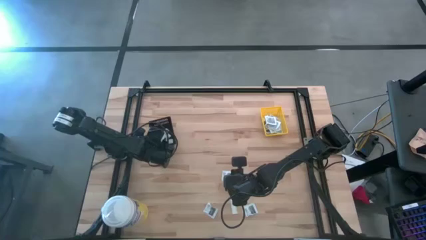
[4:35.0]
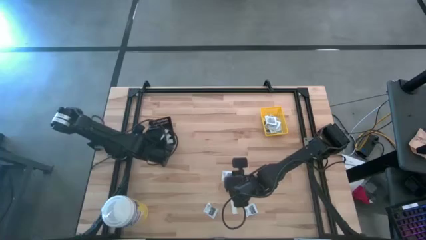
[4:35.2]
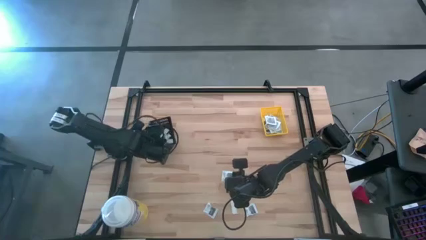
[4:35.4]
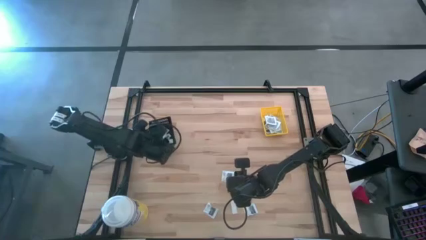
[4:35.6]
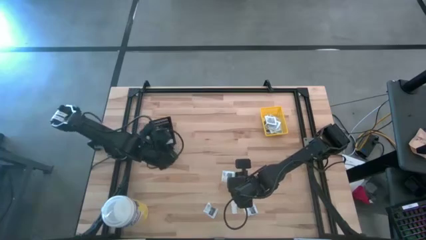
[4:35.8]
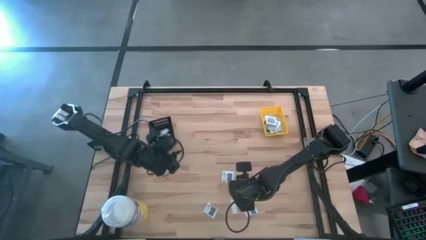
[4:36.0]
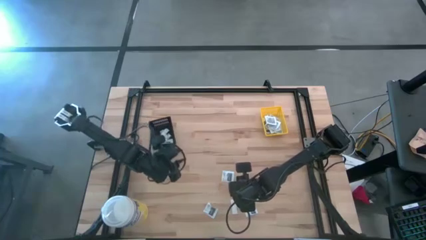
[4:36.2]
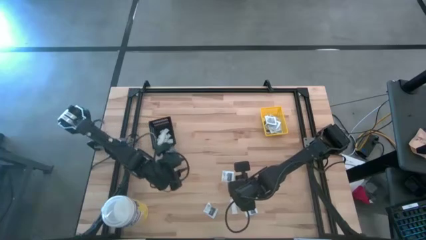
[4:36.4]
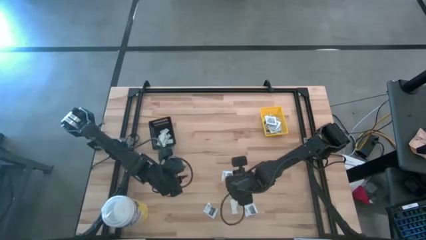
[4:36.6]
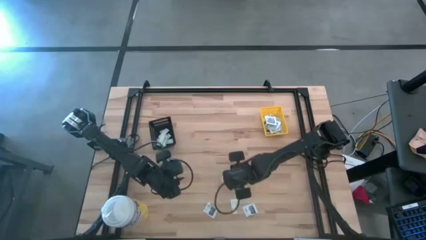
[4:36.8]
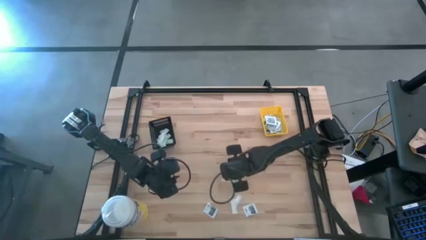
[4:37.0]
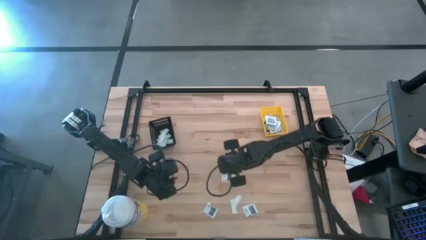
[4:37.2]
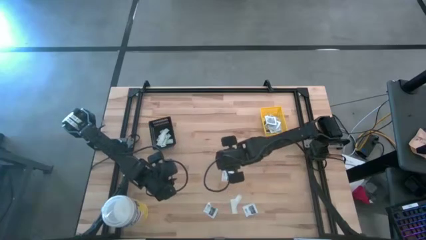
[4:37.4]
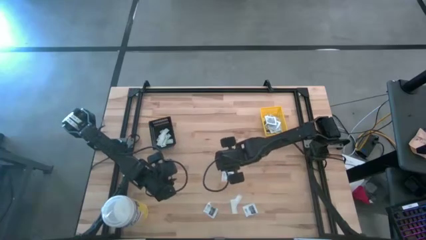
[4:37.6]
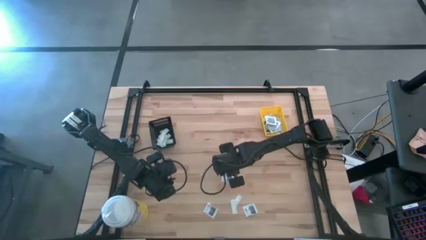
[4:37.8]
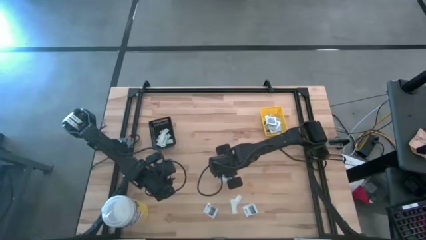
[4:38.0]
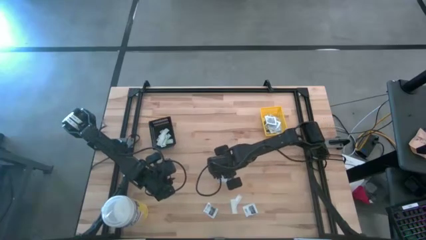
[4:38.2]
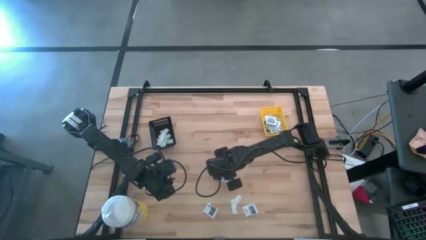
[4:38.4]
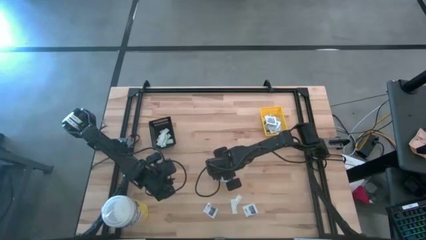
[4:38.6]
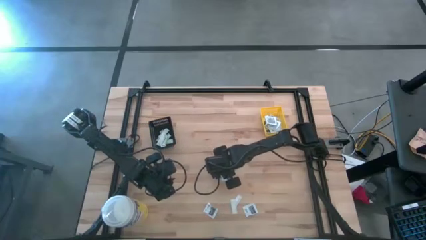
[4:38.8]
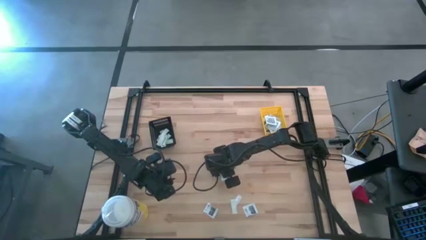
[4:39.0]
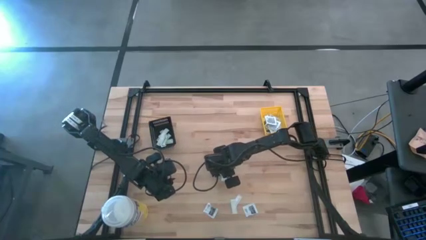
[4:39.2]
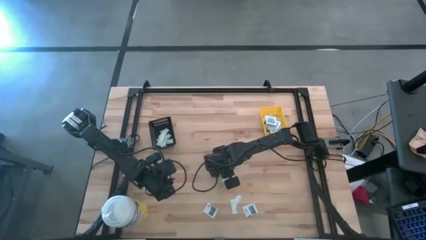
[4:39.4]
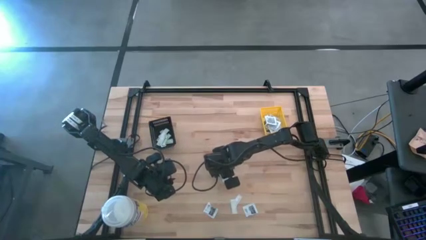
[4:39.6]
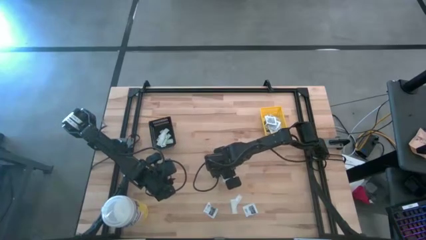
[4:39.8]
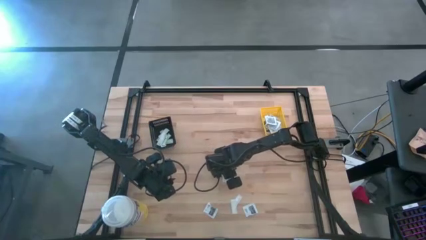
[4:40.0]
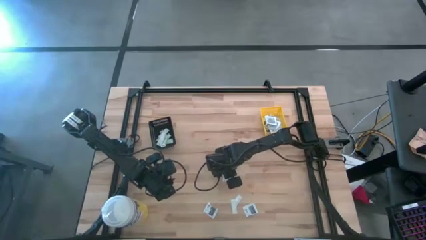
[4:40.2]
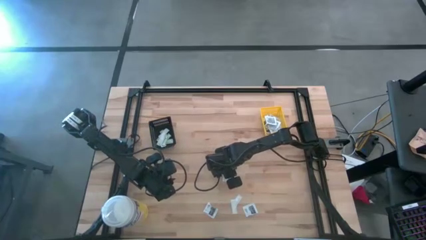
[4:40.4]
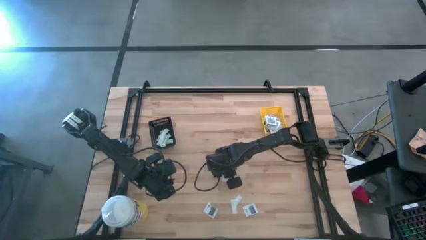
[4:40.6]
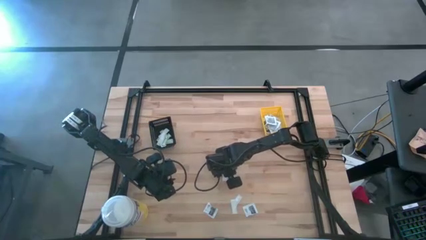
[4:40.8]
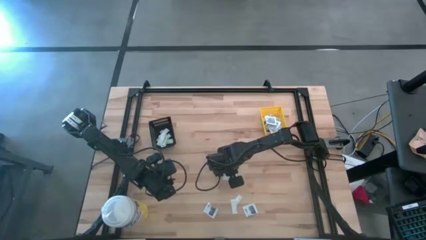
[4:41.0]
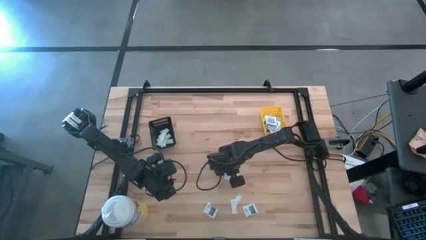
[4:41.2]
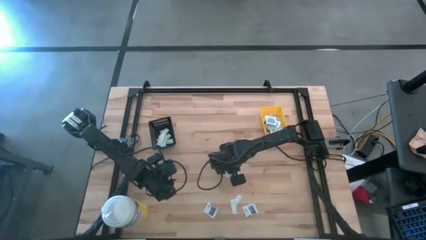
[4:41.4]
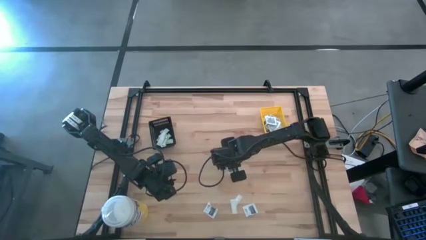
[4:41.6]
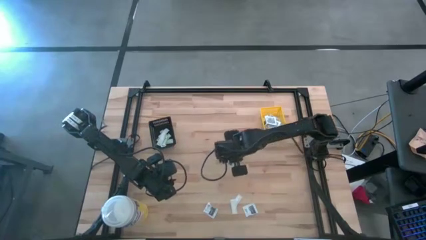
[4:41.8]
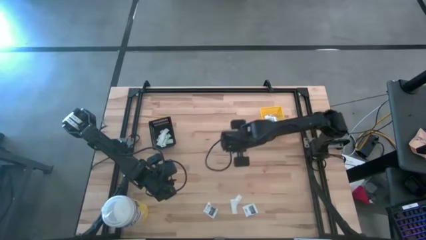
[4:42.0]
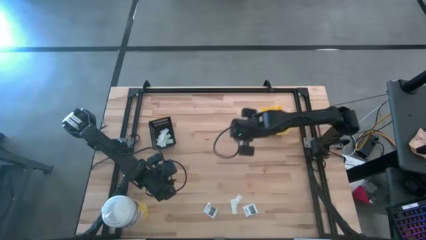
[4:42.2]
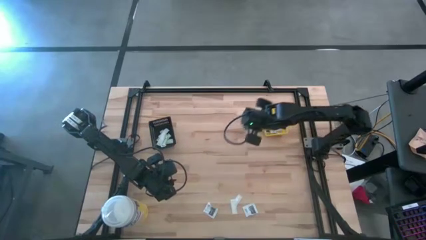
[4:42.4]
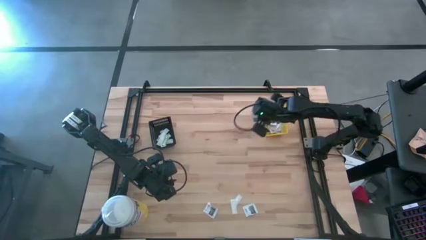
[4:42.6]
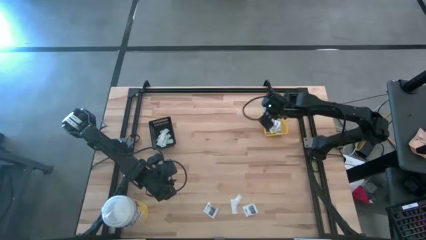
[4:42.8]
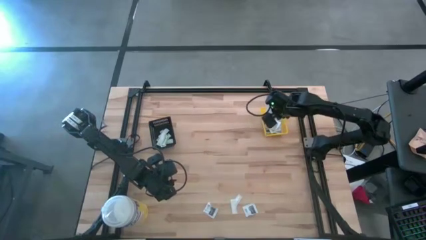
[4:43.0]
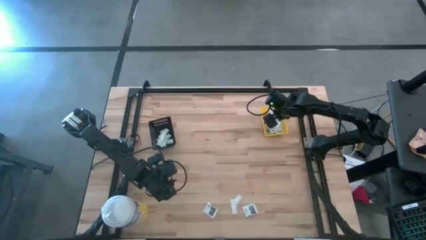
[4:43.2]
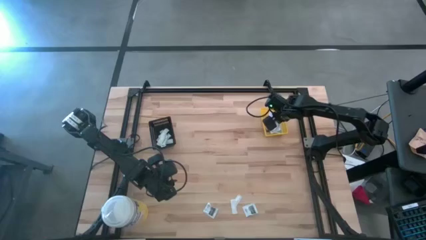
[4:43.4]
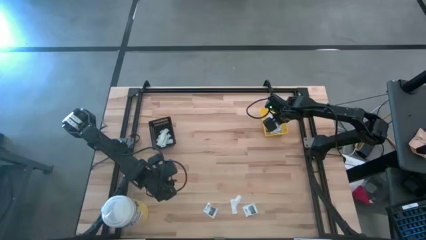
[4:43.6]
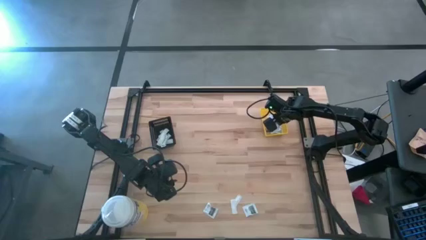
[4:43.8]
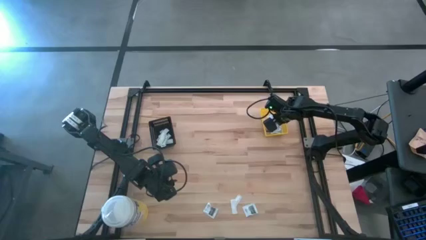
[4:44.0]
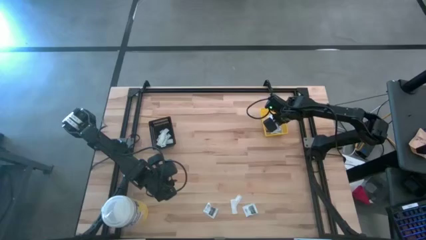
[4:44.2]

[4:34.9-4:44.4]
Task: Pick & Place First Aid Supplies
Put the black pad into the yellow bin

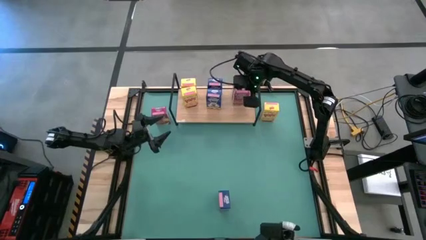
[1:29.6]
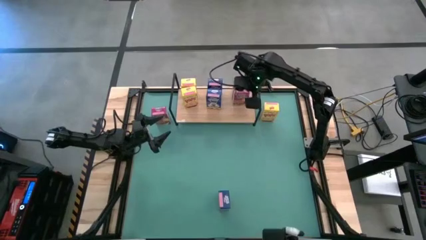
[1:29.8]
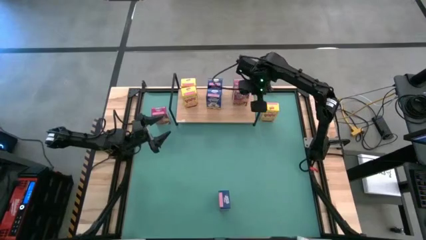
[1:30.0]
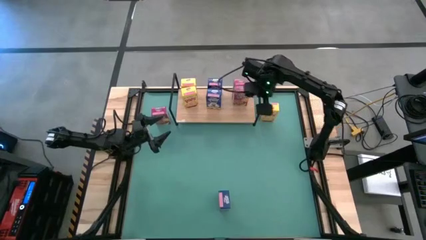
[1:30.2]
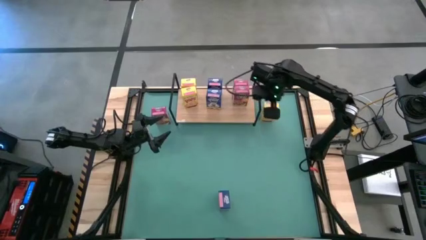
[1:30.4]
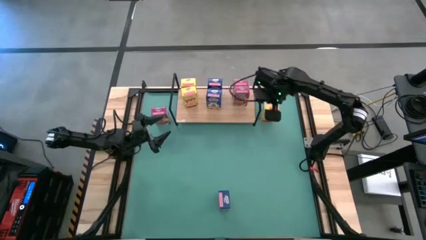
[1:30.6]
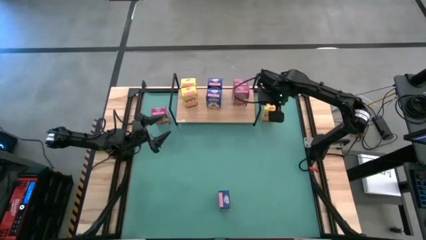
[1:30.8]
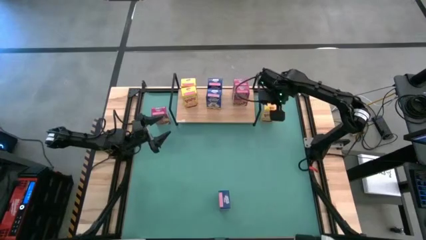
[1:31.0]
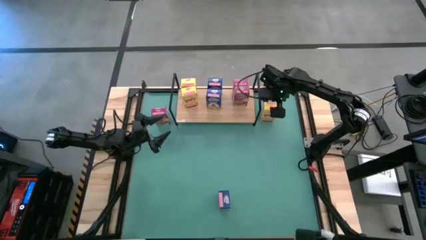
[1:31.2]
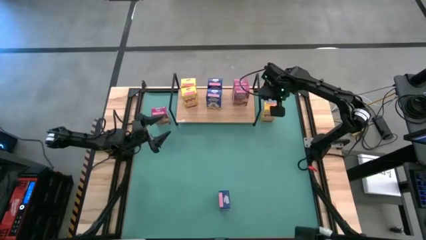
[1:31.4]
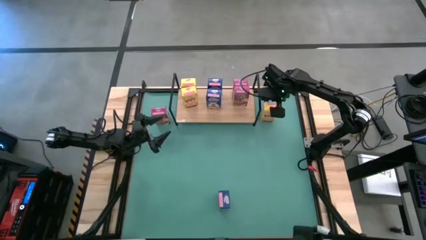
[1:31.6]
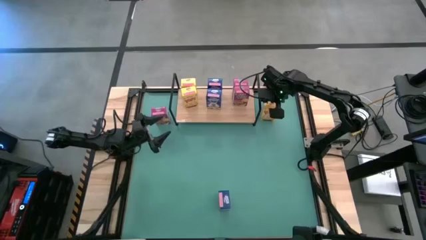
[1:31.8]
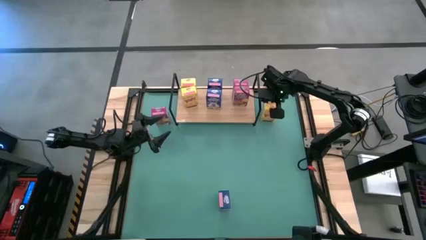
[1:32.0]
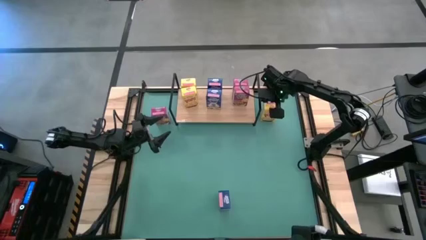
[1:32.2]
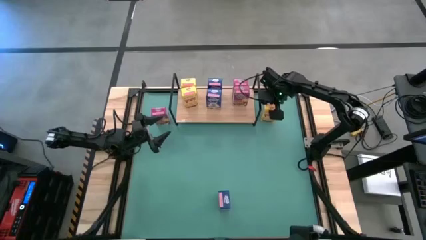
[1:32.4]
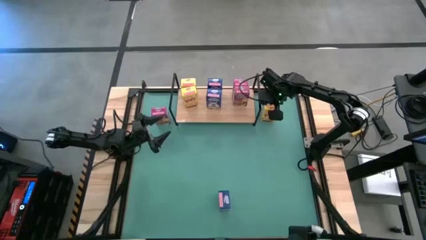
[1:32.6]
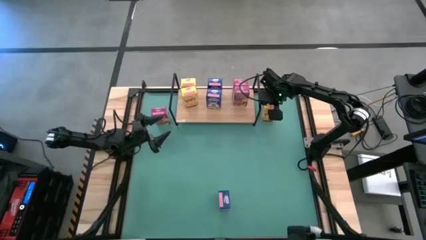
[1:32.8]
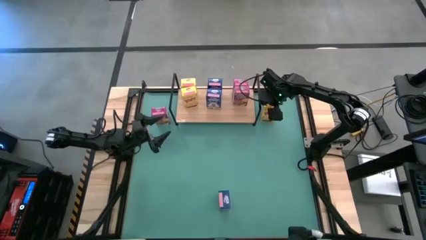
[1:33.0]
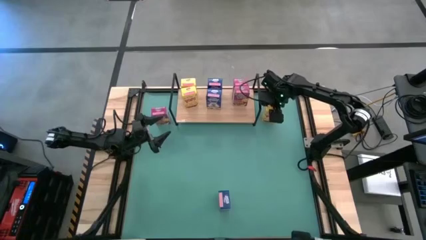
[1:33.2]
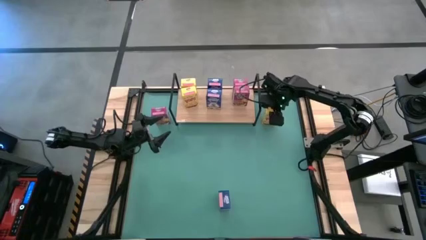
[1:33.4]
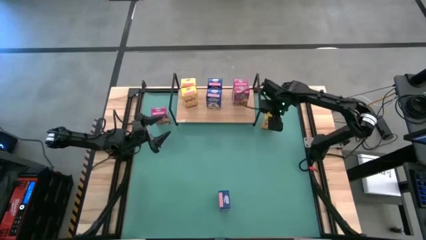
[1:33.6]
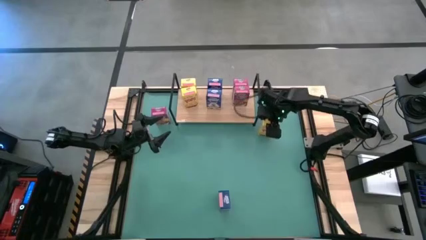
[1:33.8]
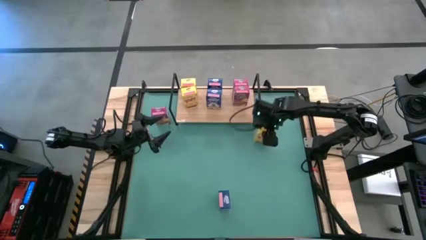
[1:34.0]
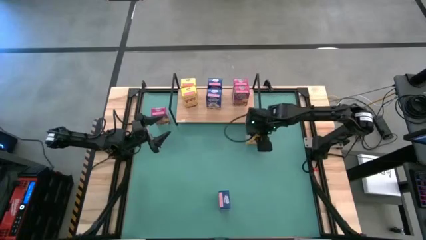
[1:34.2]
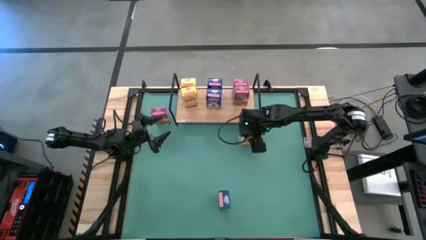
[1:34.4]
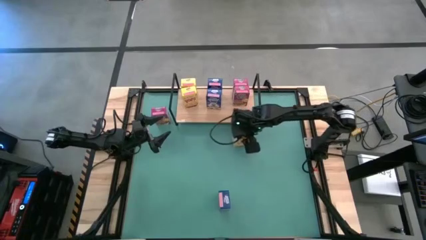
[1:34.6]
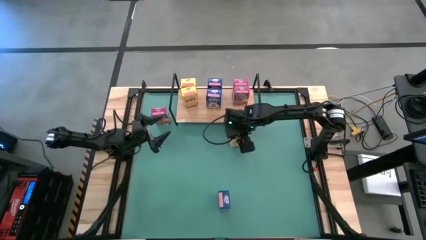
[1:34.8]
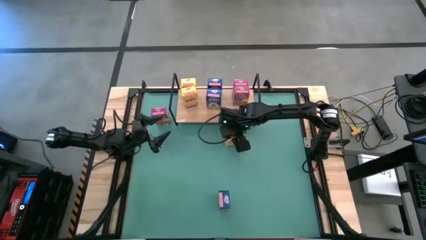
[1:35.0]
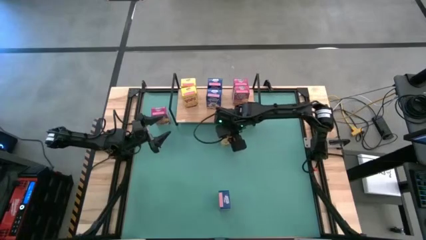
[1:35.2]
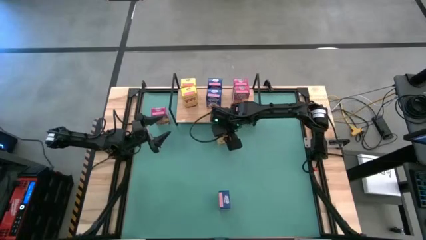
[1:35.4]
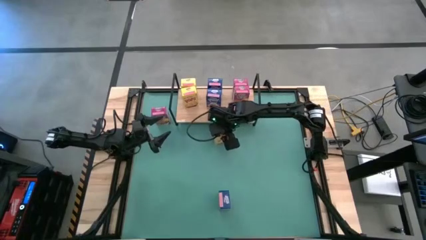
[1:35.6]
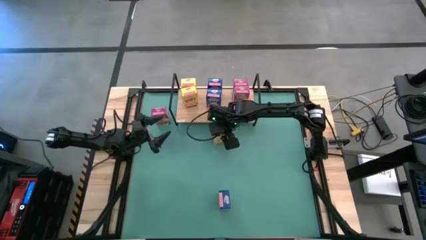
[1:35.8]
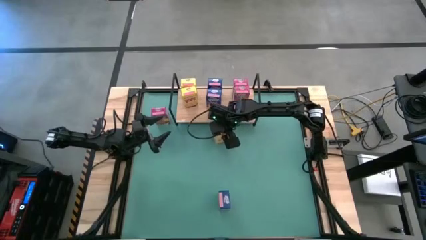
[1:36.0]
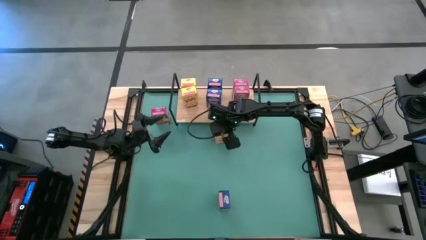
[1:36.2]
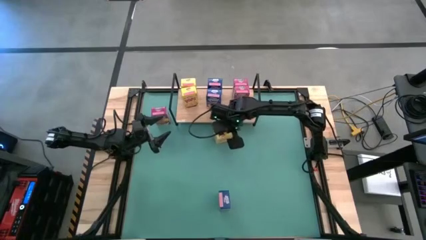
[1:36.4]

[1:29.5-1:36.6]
Task: Stack cereal on shelf
Move the yellow cereal box to the front of the shelf
